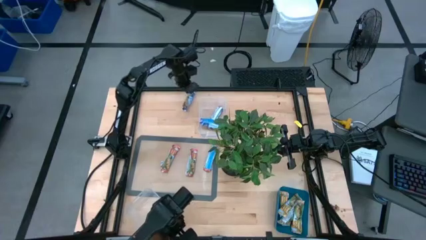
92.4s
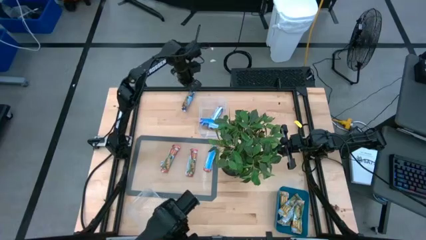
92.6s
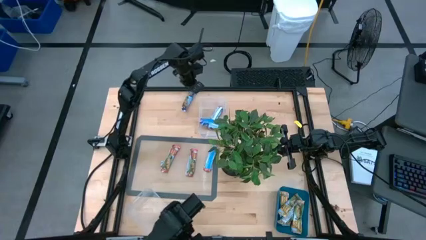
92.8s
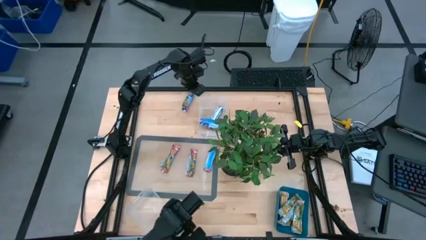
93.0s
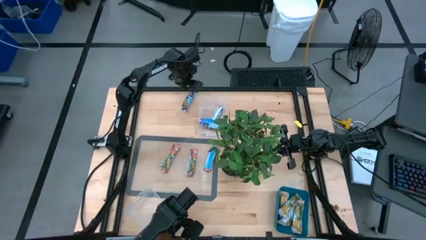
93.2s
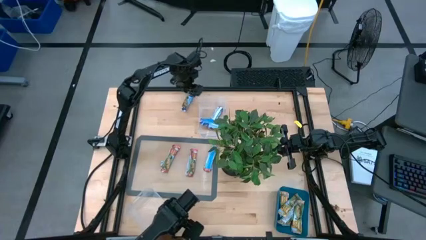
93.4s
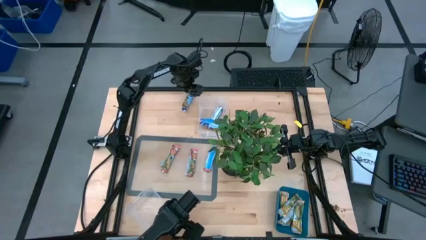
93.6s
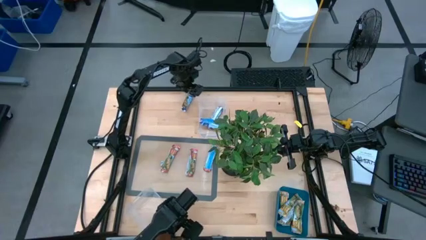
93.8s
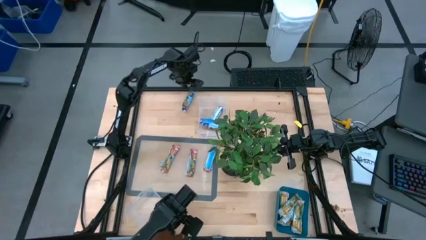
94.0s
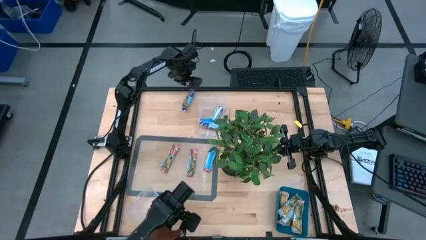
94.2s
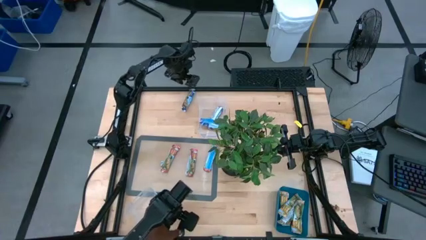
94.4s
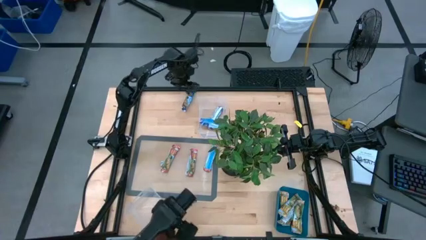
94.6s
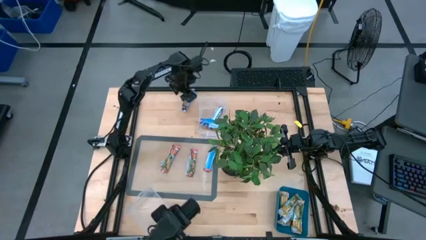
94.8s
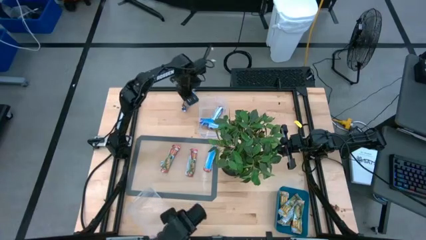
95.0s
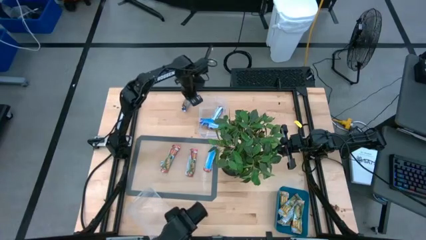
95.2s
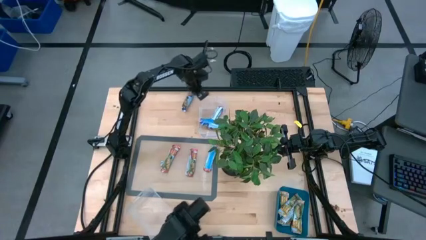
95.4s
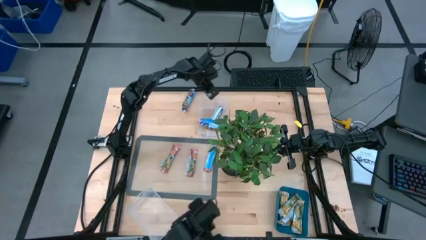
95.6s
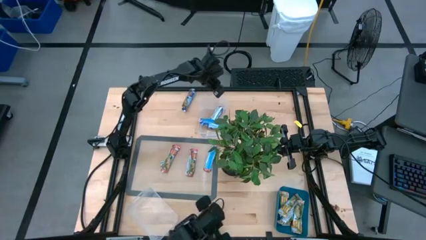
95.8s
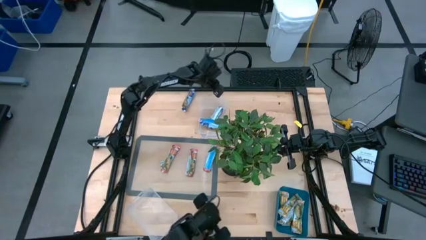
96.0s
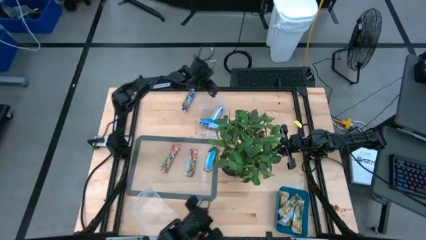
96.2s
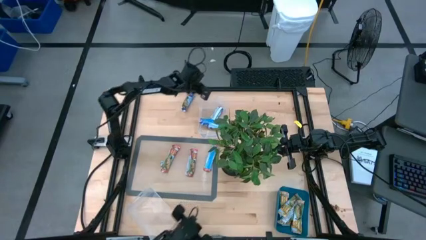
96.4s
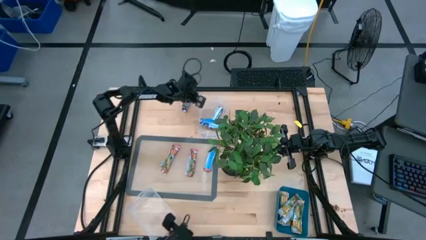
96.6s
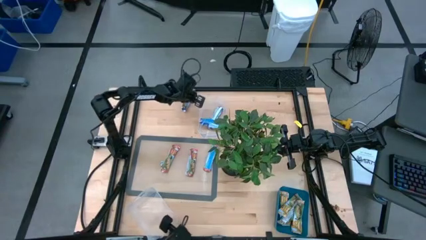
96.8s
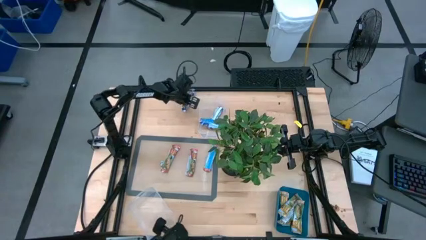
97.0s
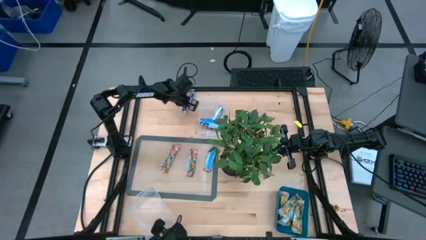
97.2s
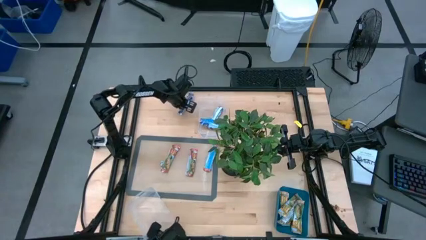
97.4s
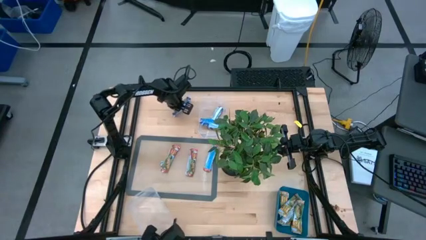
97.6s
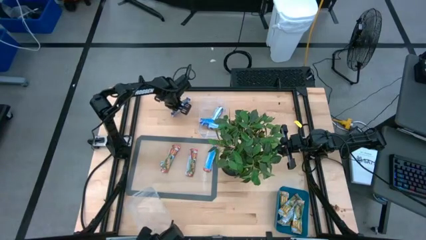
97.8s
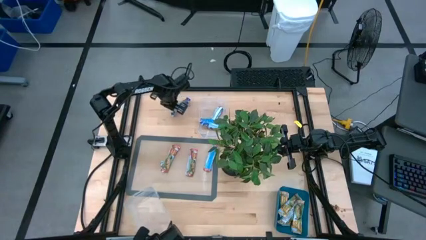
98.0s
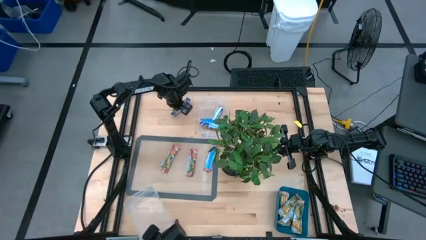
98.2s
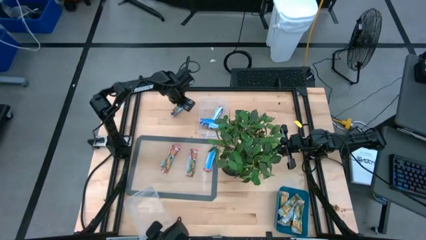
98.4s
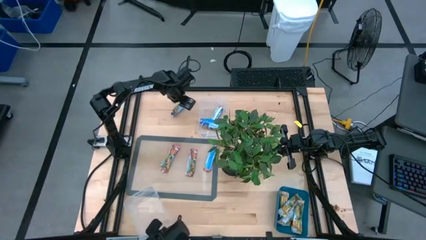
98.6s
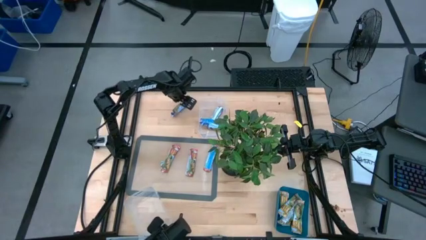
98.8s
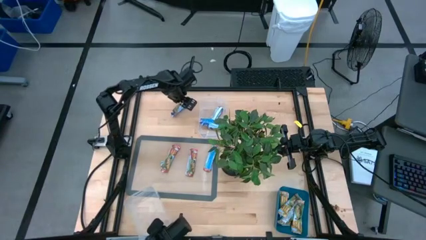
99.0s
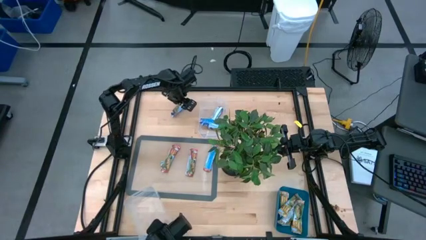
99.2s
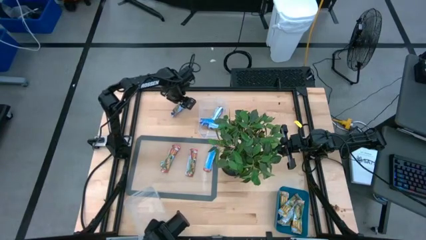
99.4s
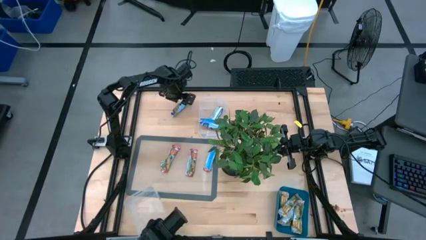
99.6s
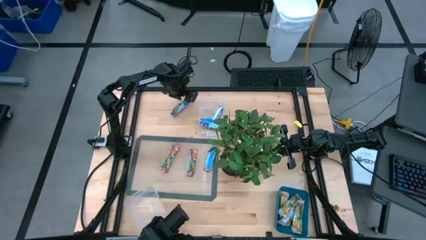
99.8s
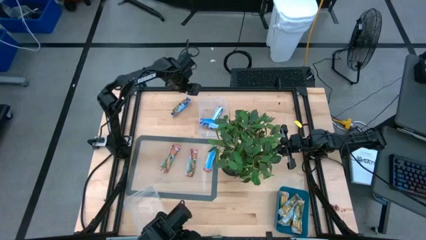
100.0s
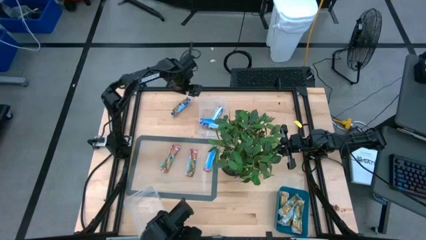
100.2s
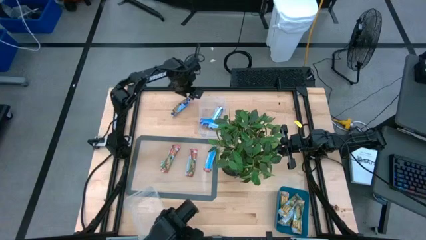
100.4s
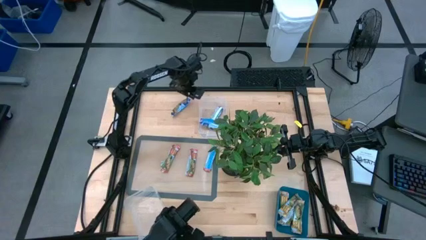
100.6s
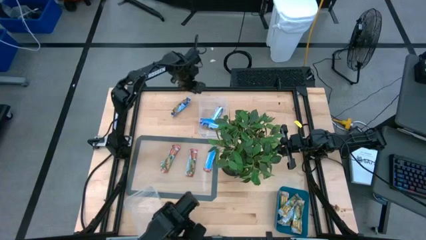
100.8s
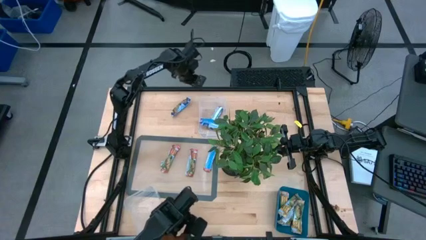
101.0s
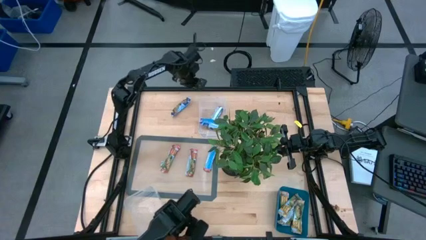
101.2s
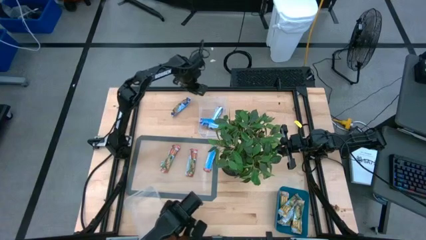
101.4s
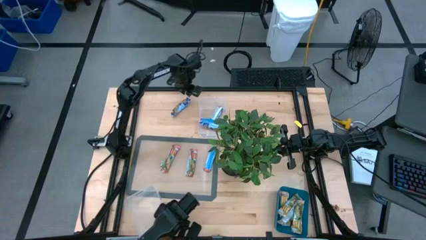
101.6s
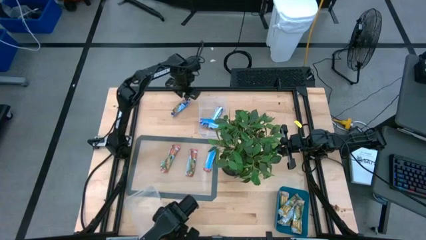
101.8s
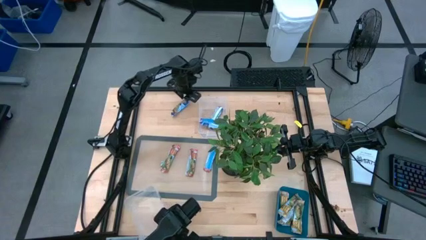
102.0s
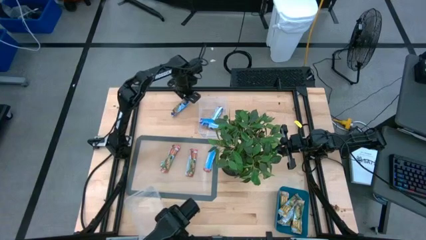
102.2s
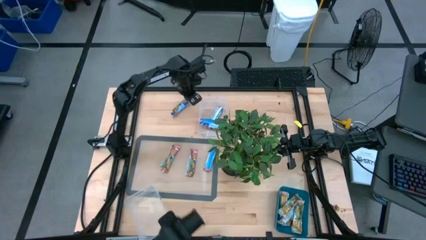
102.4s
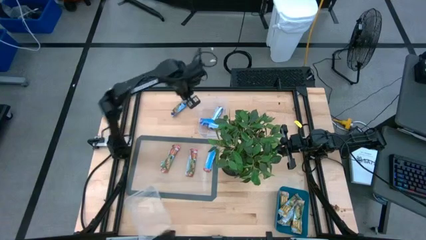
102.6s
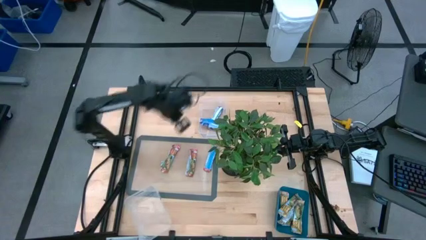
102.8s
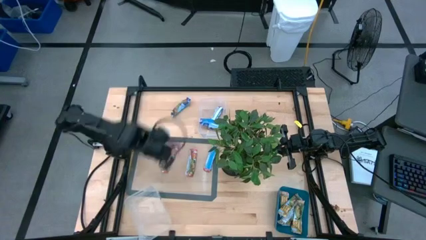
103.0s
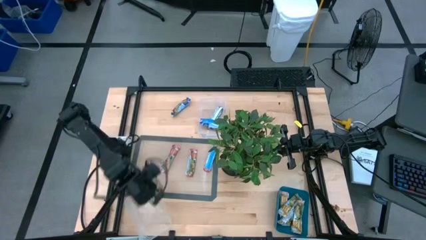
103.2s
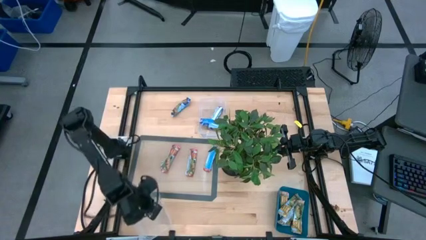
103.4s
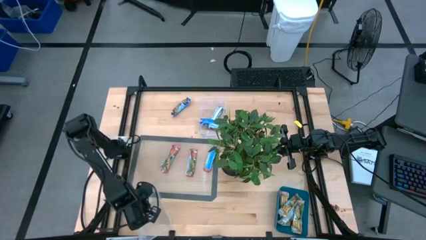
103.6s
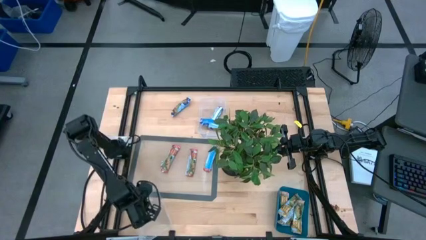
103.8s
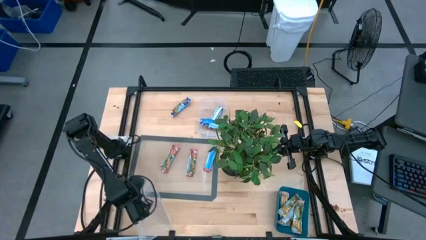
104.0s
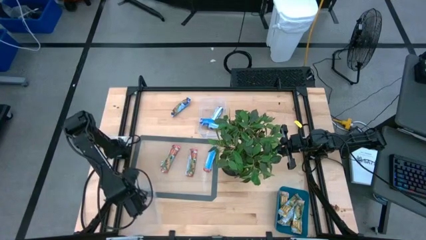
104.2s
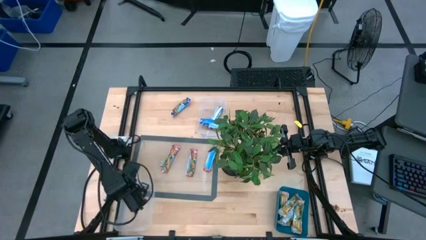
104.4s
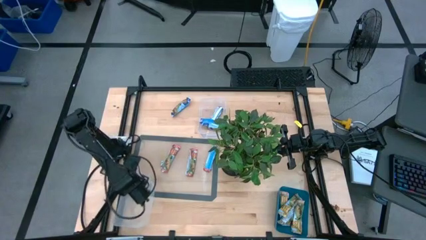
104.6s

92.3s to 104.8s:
Task: Pick and place Granola Bars by type
Adjust the bottom transparent bin

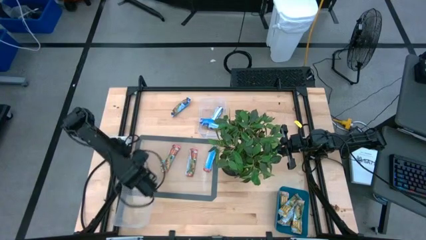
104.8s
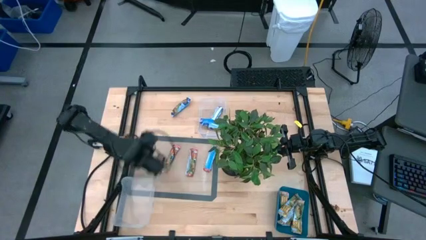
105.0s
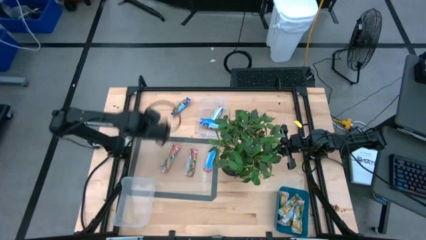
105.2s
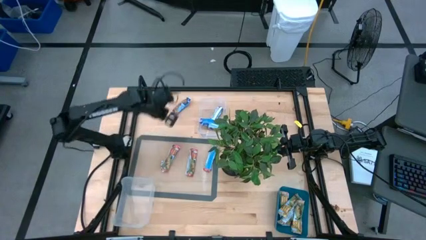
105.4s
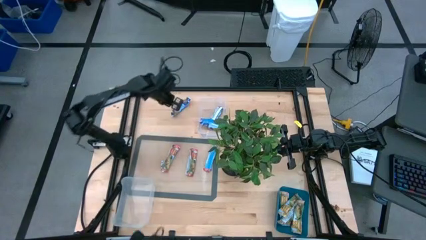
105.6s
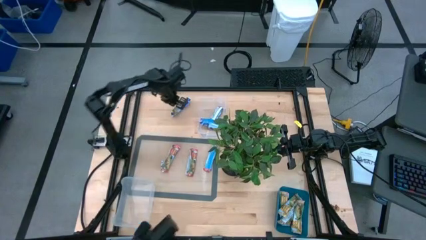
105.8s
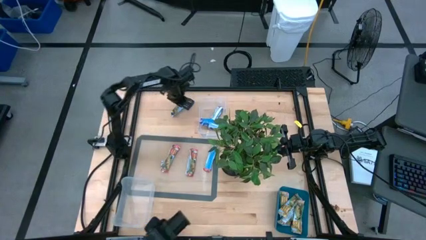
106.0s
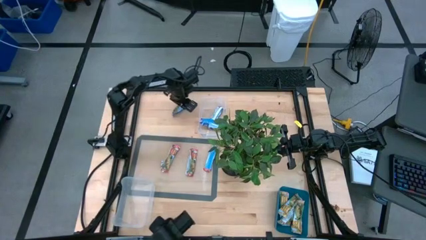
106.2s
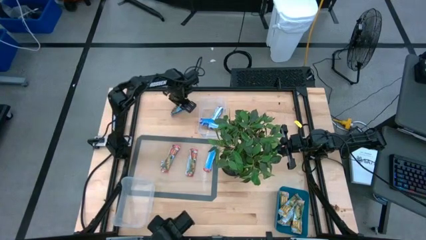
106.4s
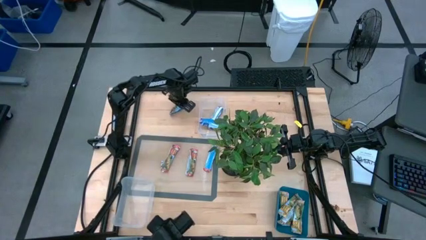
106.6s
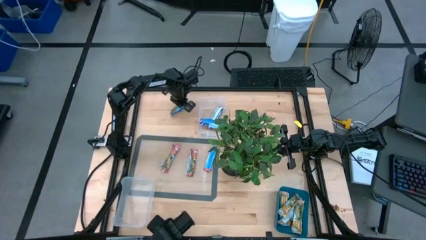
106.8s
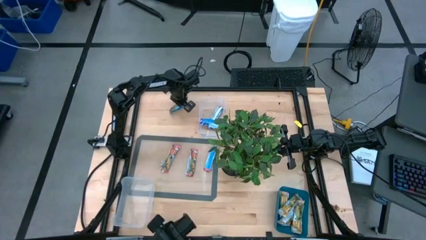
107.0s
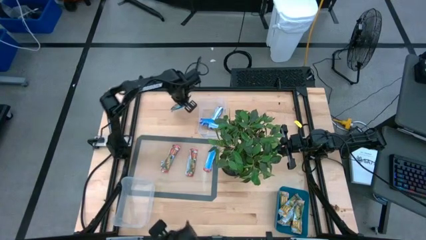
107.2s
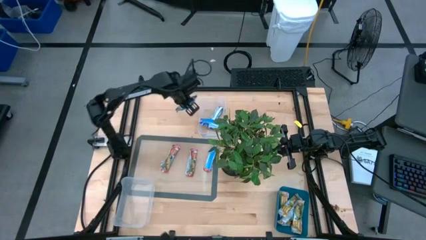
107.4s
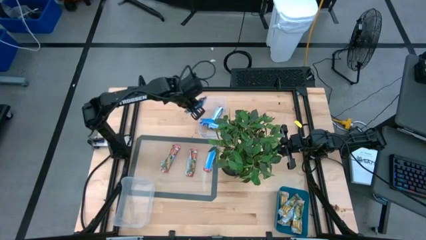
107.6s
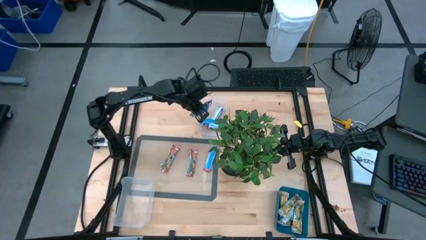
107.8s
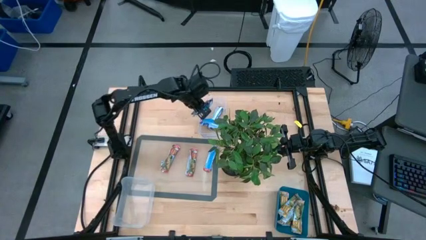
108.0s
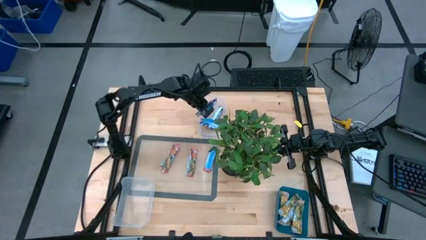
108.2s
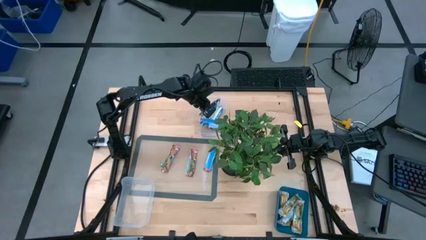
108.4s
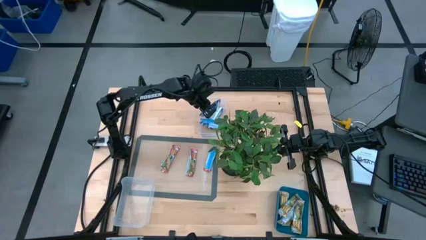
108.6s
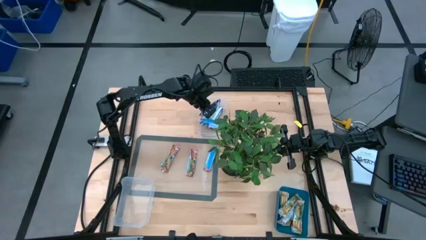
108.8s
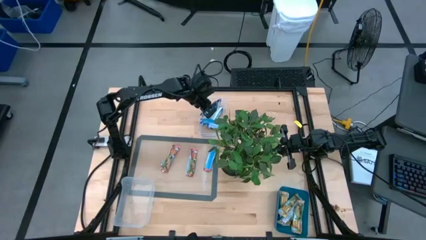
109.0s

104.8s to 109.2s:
Put the blue granola bar into the top transparent bin
